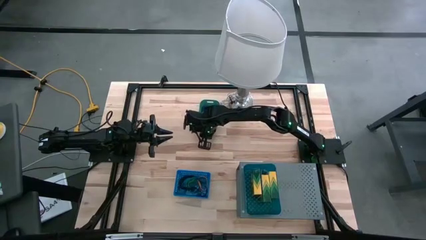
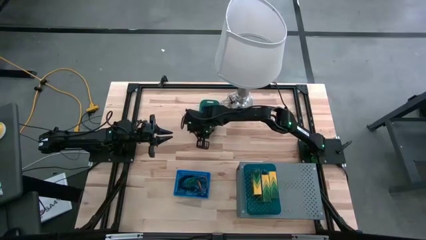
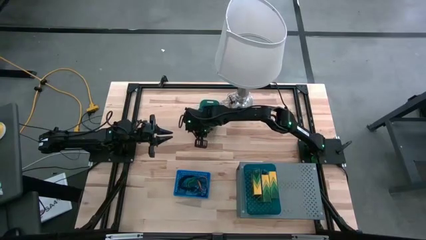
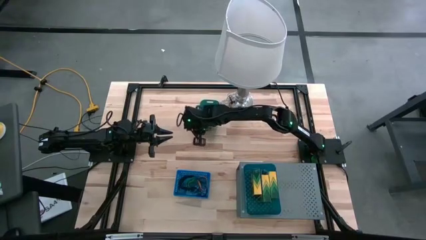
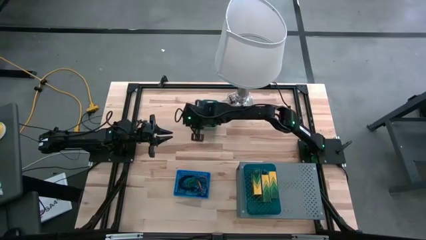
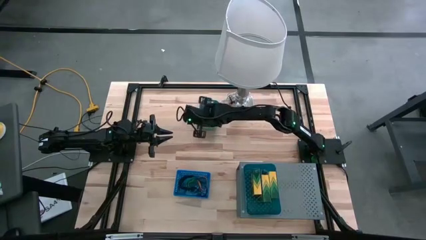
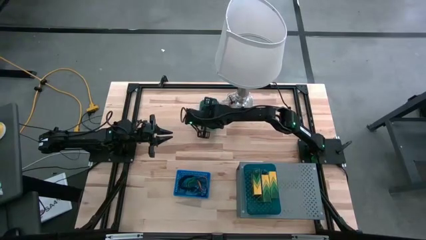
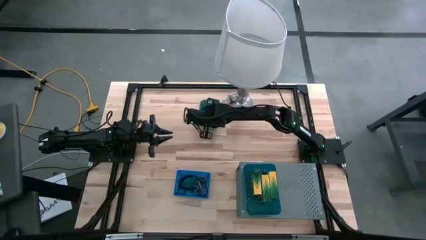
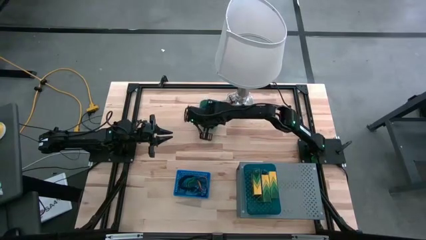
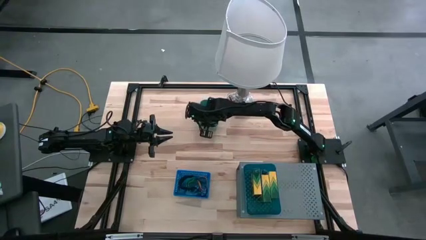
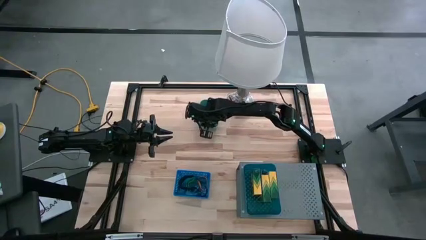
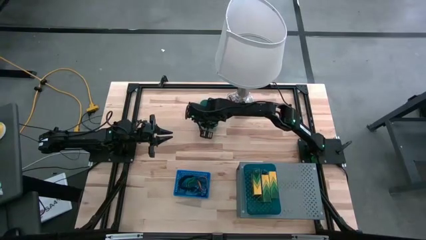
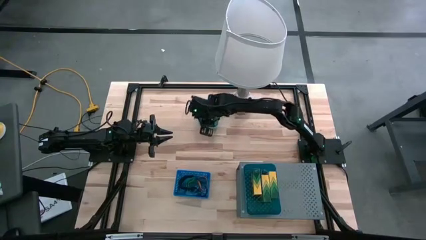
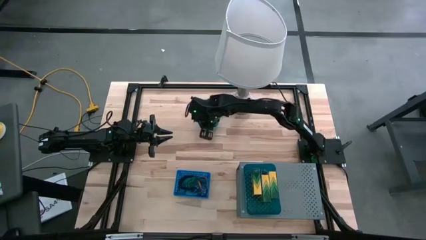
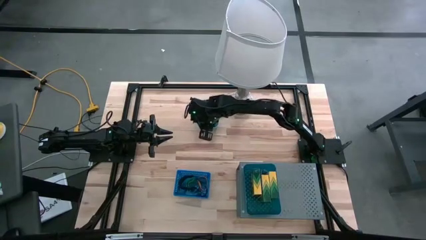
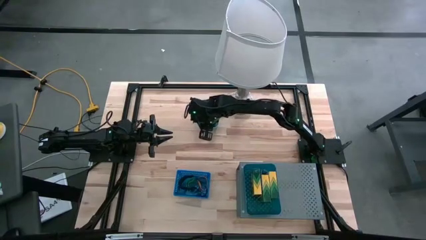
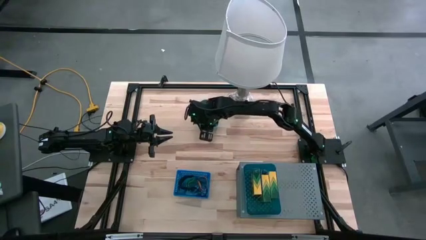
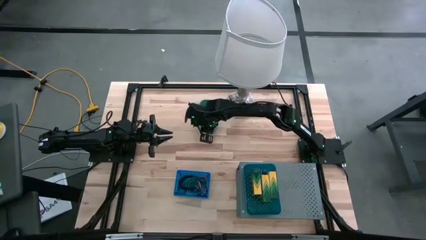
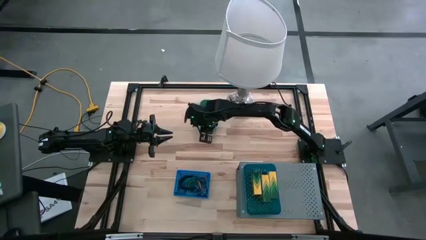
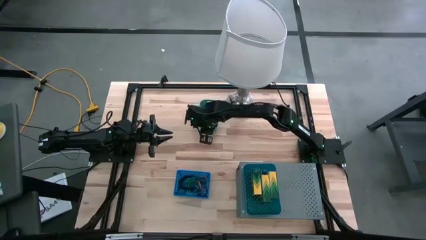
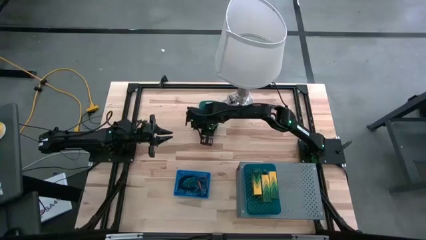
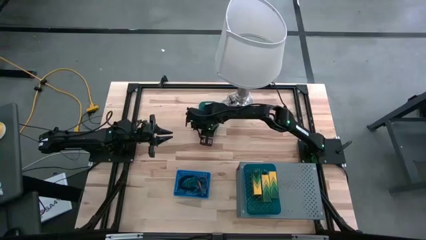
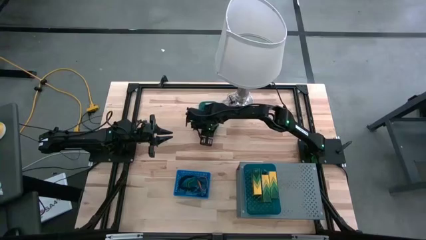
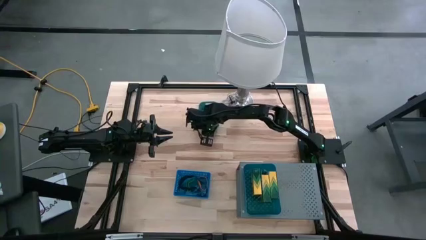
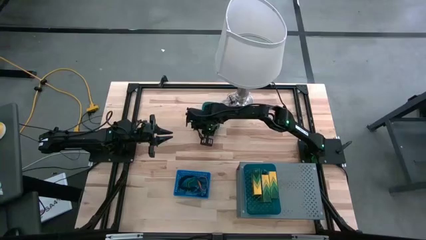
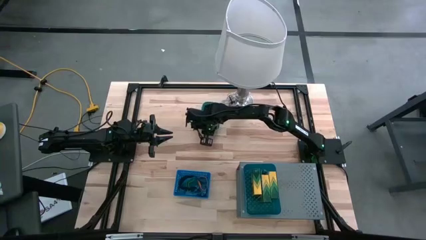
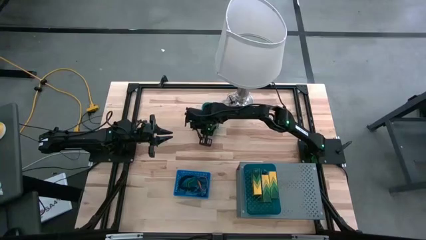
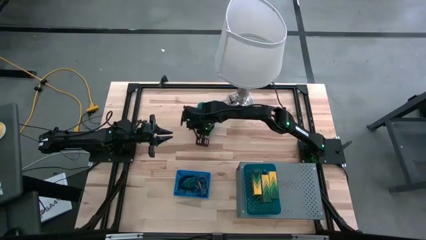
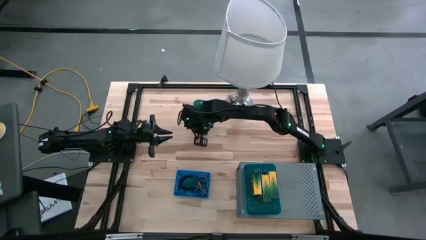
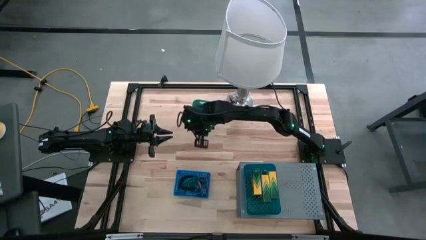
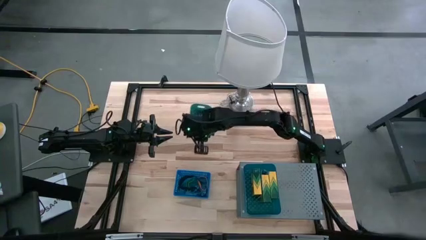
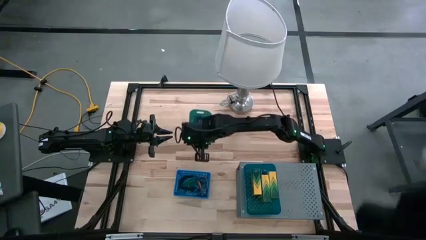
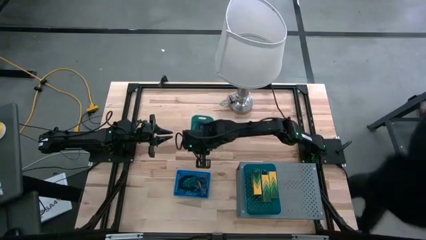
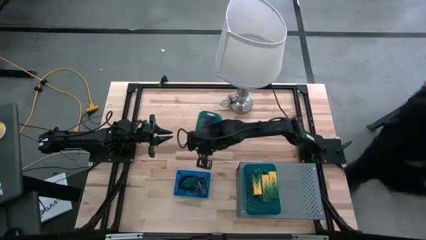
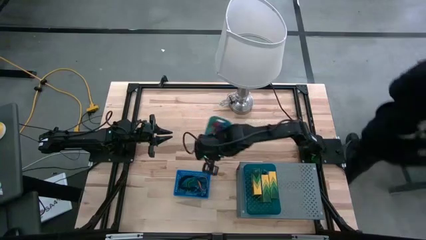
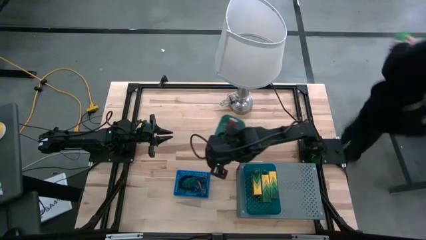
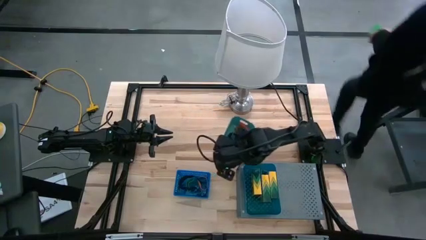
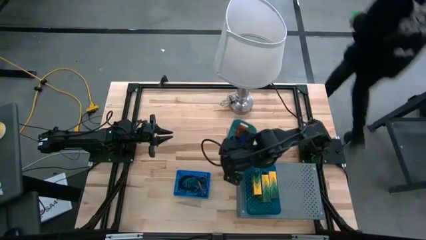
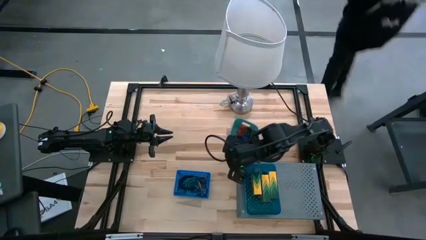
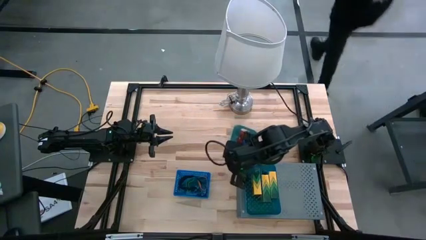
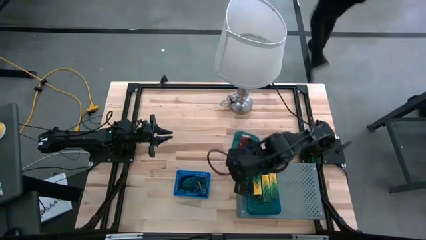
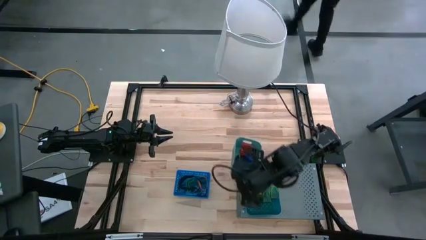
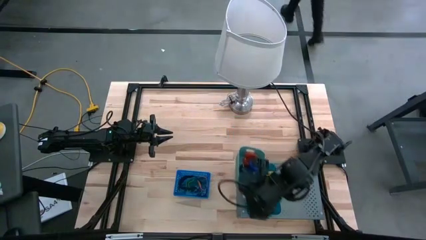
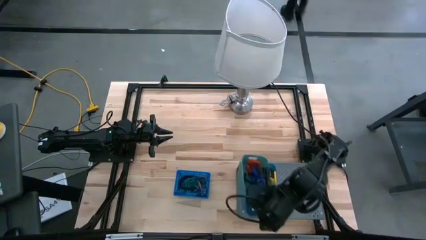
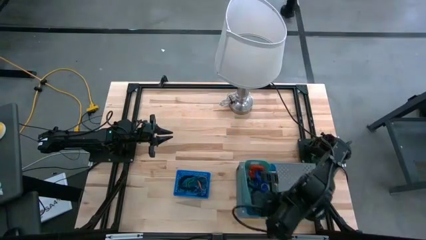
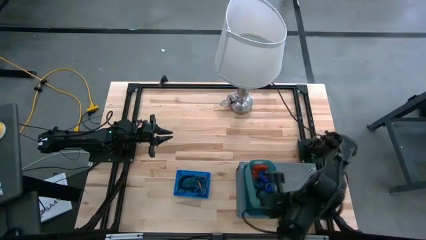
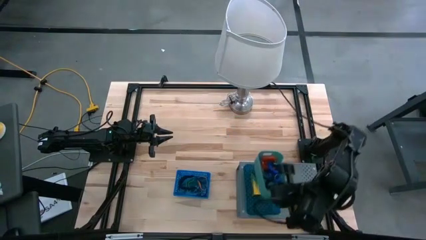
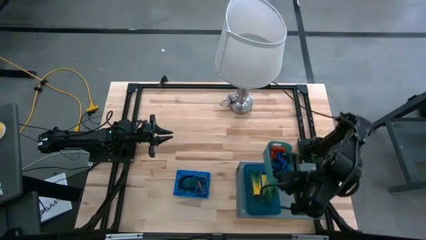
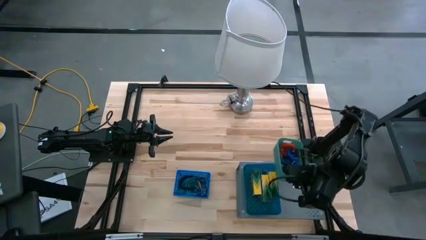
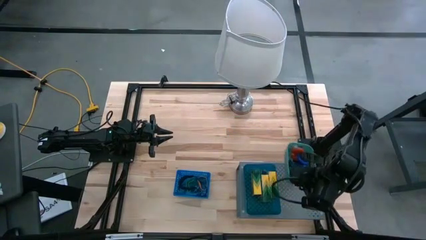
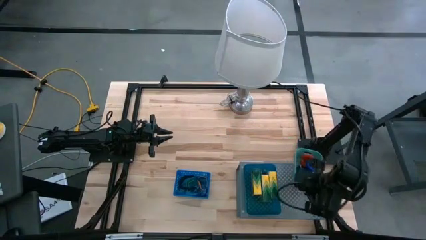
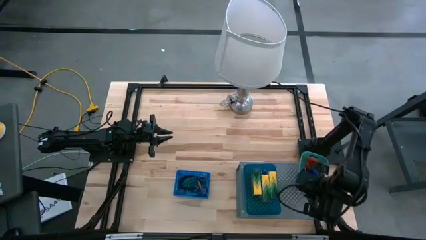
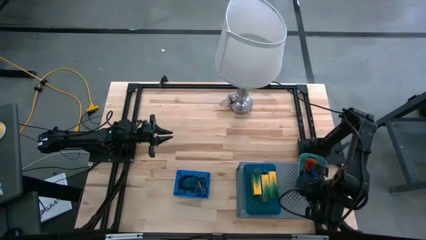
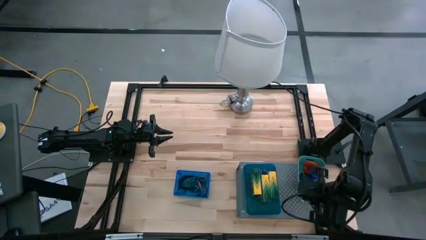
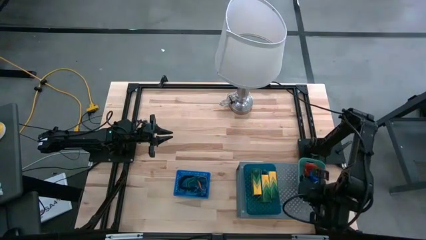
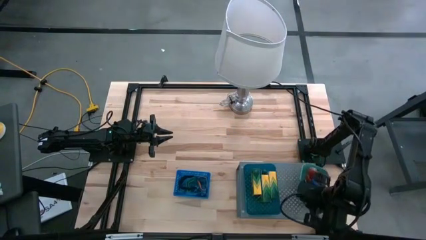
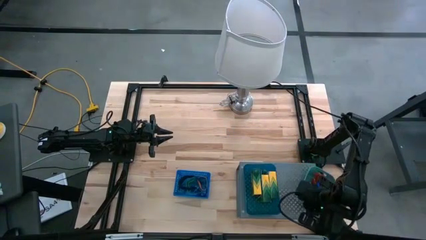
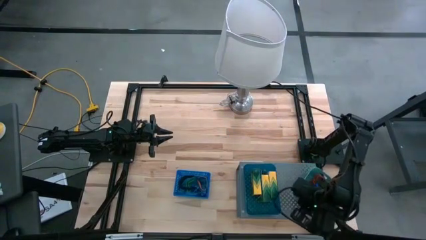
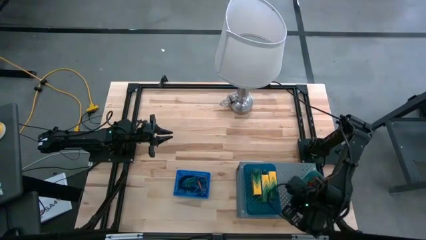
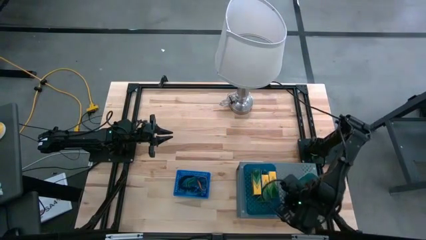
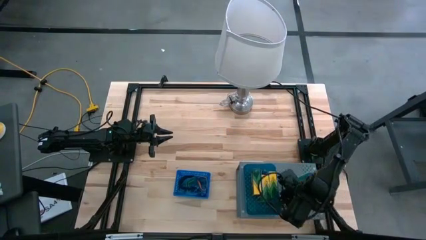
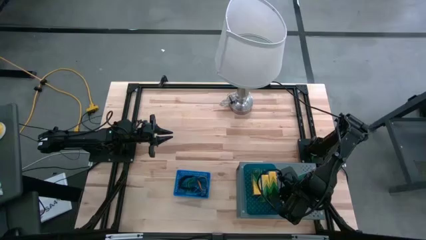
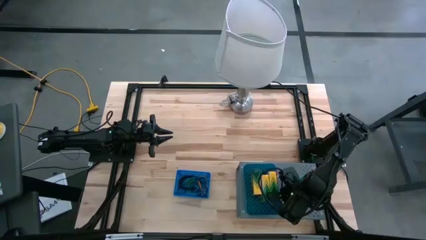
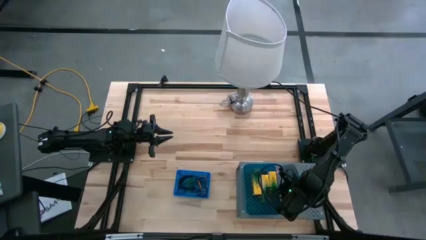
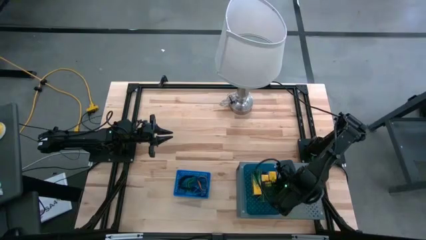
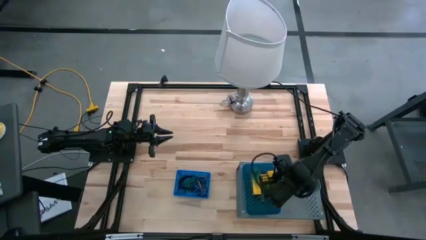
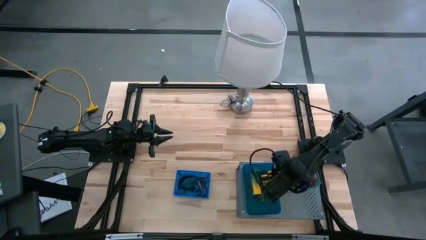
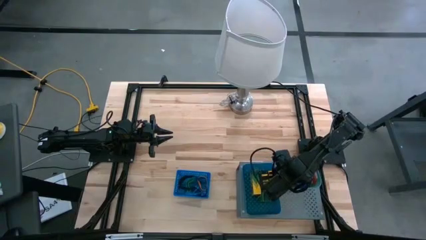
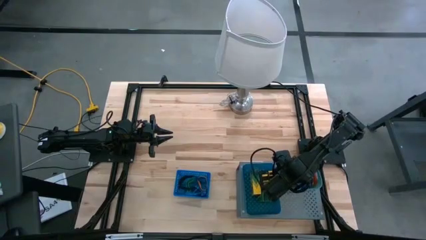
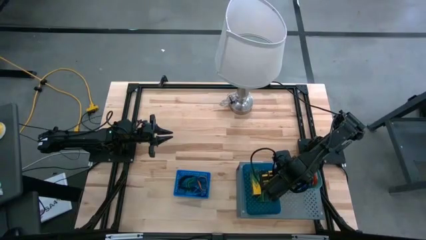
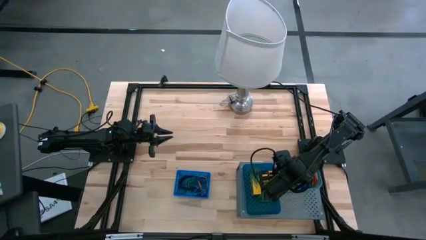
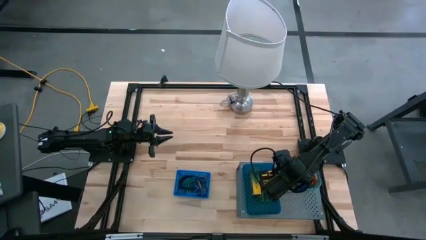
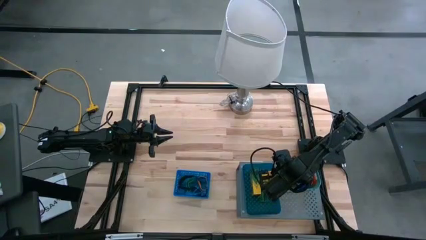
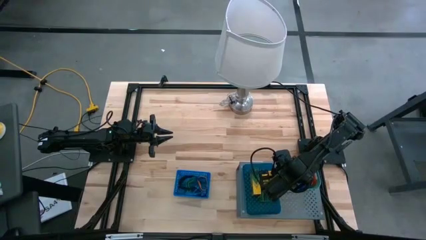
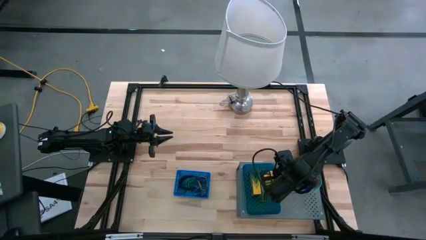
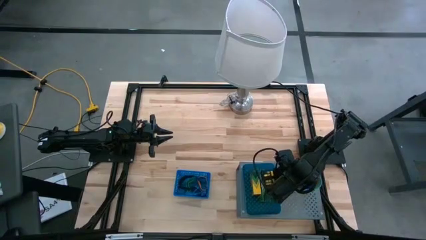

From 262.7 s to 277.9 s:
Task: Pick & Place Office Desk Supplies
Put the green bin on the shelf

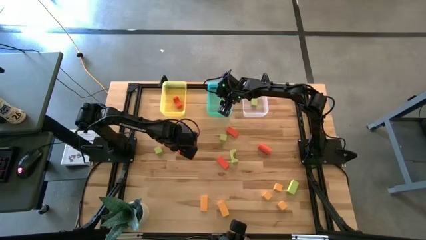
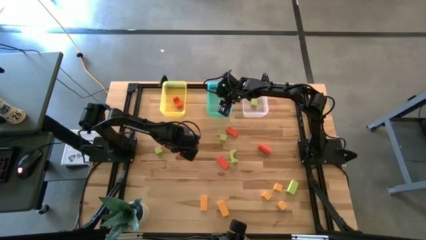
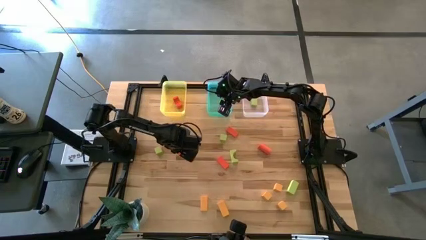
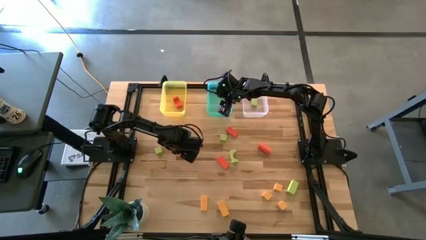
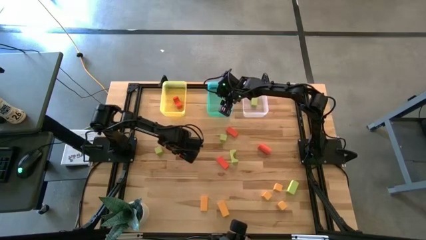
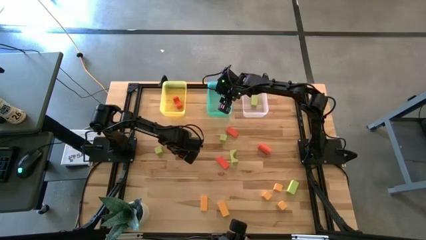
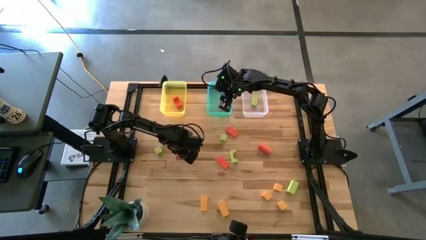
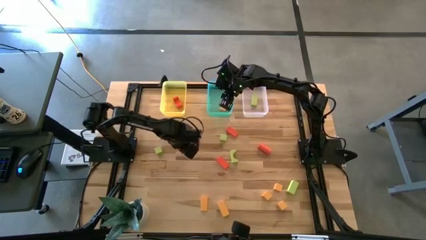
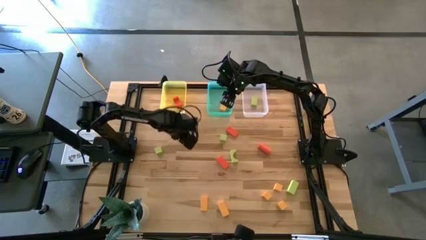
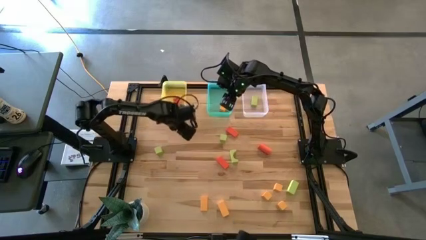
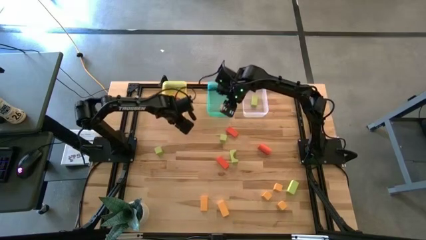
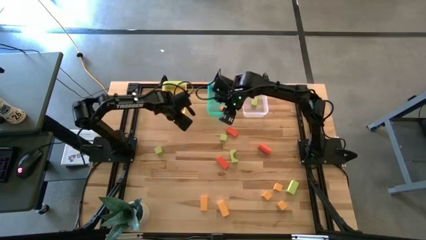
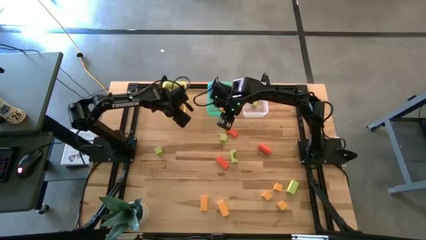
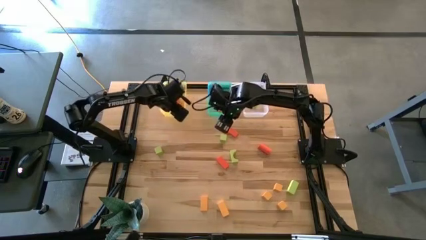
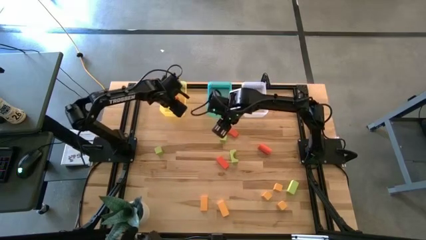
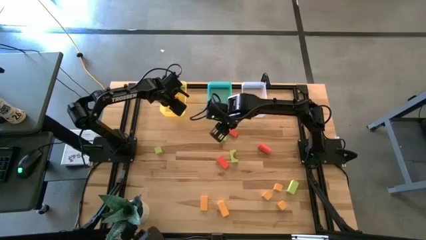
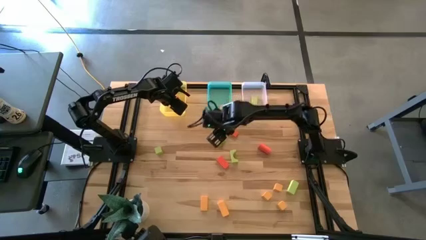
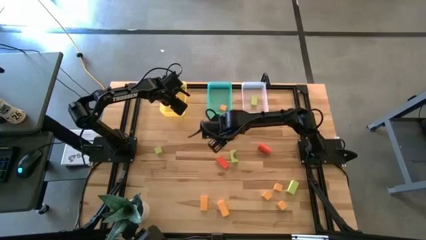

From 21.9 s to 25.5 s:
Task: Sort & place blocks by color
Put the orange block into the yellow bin
